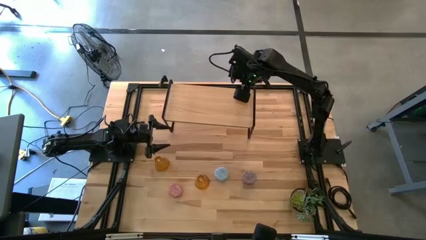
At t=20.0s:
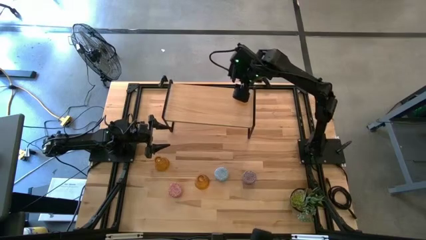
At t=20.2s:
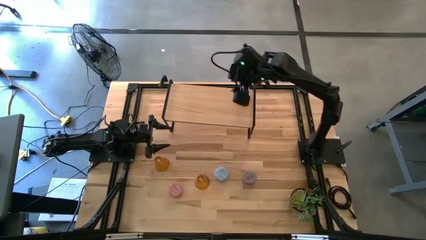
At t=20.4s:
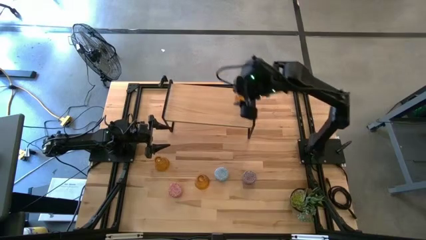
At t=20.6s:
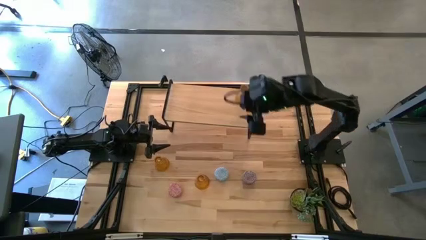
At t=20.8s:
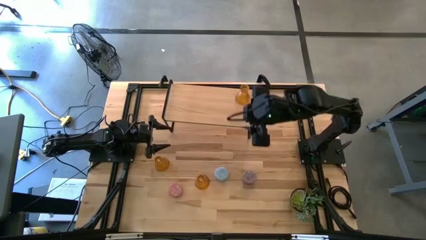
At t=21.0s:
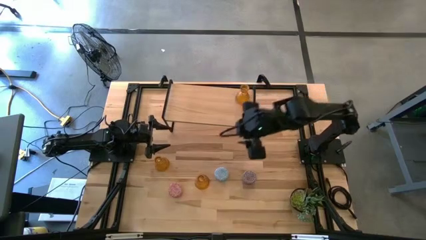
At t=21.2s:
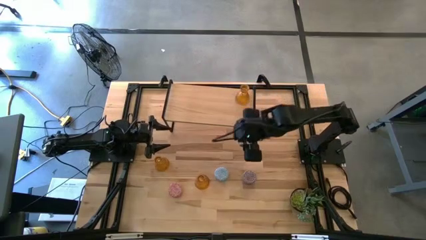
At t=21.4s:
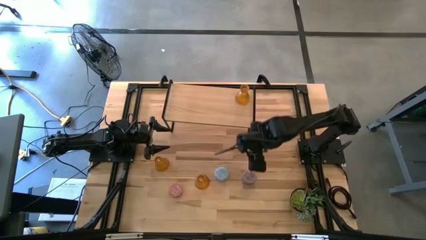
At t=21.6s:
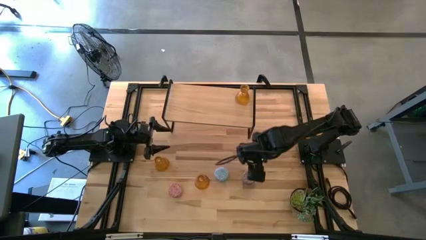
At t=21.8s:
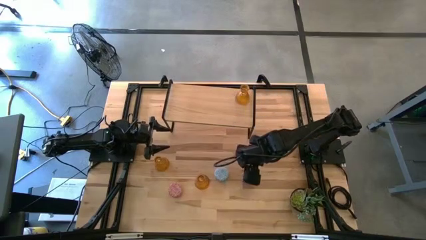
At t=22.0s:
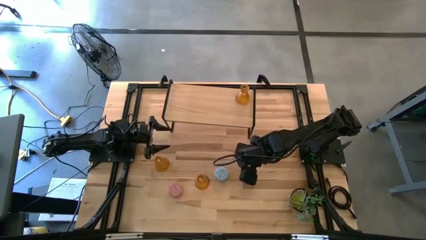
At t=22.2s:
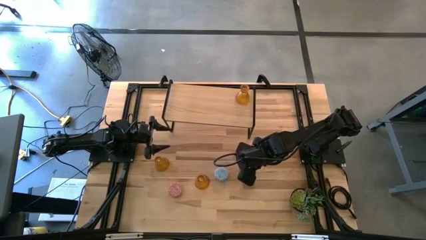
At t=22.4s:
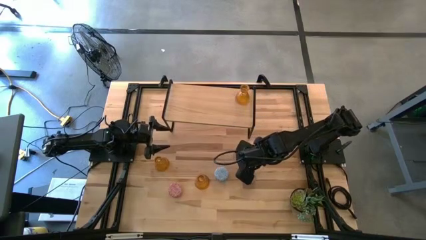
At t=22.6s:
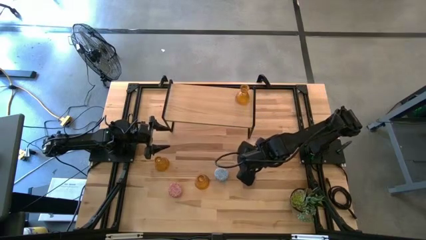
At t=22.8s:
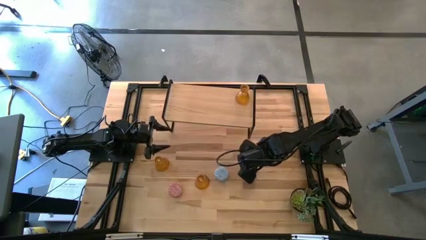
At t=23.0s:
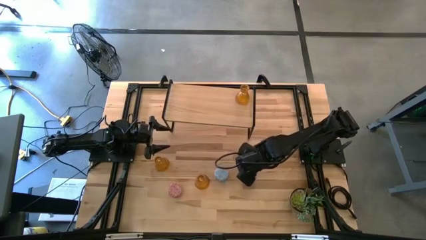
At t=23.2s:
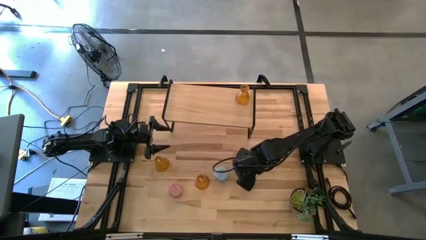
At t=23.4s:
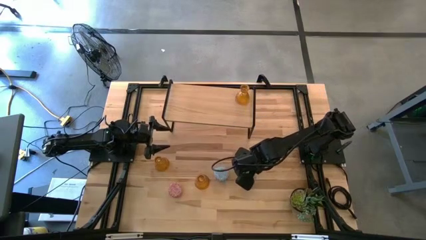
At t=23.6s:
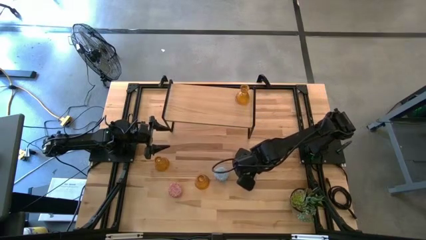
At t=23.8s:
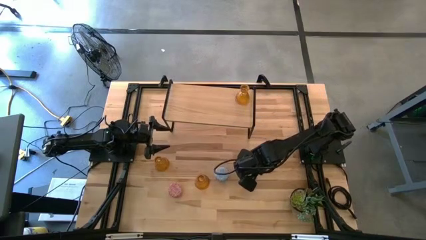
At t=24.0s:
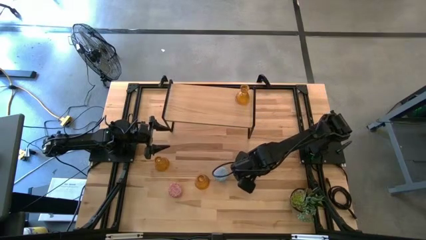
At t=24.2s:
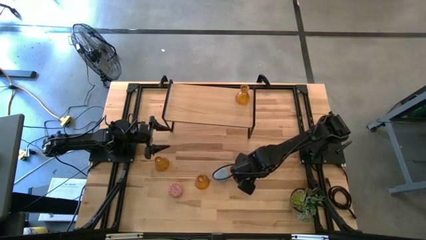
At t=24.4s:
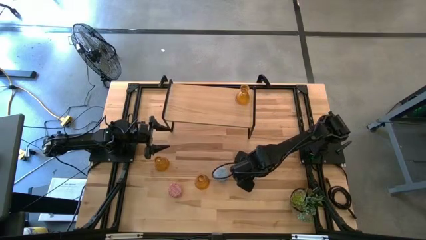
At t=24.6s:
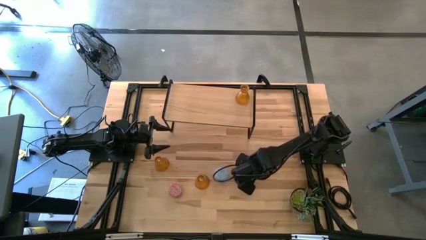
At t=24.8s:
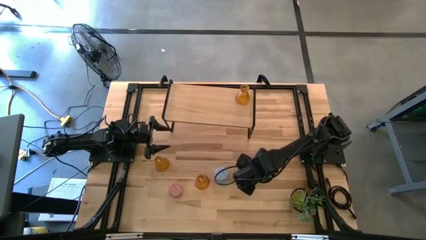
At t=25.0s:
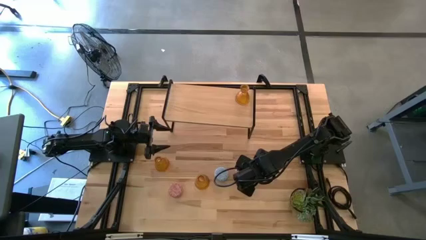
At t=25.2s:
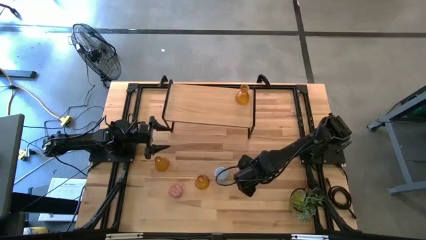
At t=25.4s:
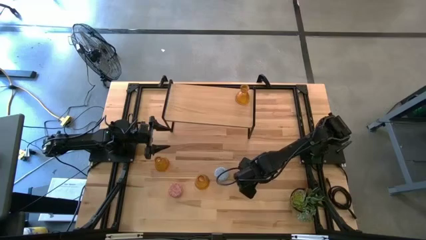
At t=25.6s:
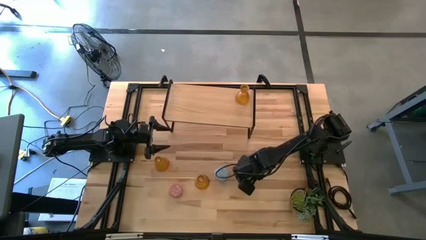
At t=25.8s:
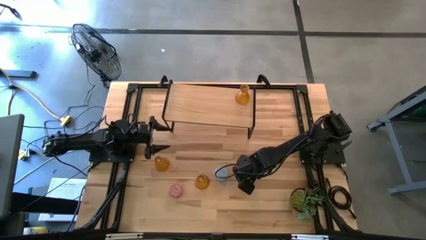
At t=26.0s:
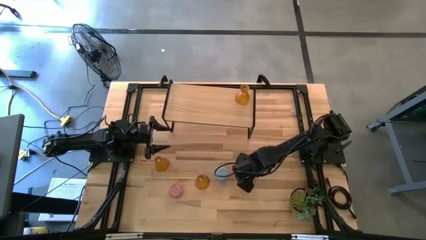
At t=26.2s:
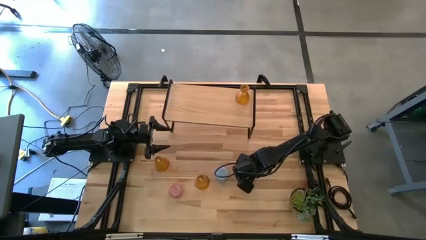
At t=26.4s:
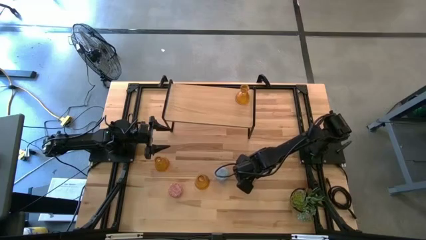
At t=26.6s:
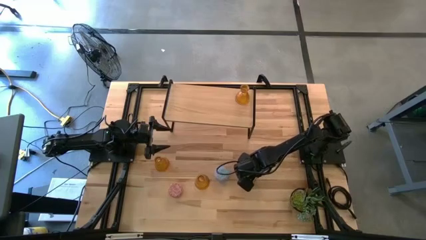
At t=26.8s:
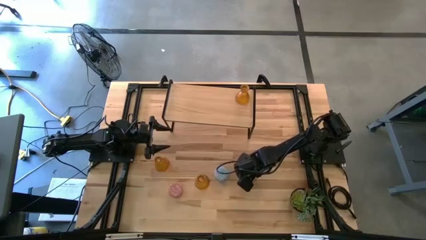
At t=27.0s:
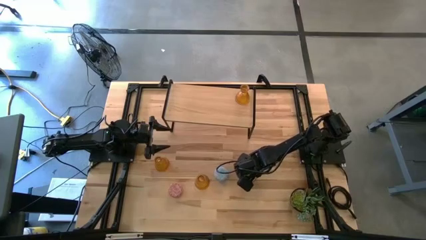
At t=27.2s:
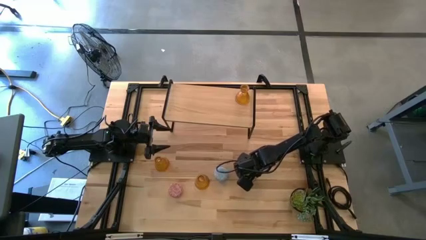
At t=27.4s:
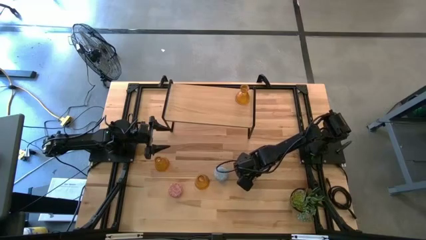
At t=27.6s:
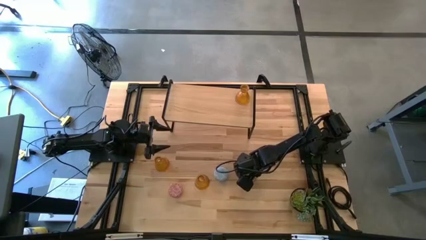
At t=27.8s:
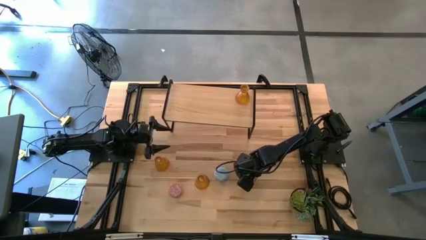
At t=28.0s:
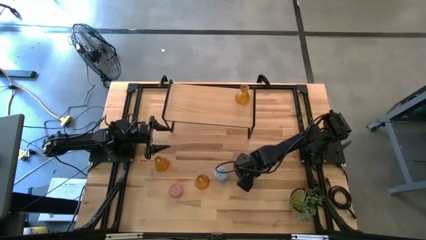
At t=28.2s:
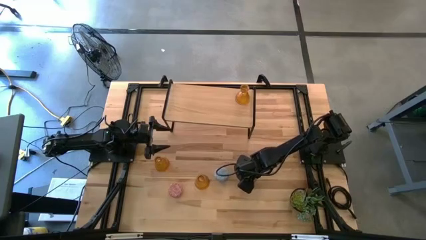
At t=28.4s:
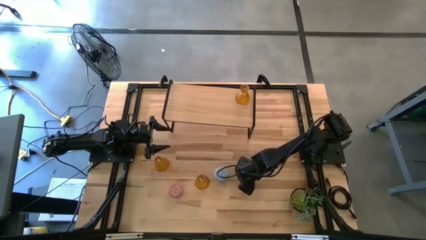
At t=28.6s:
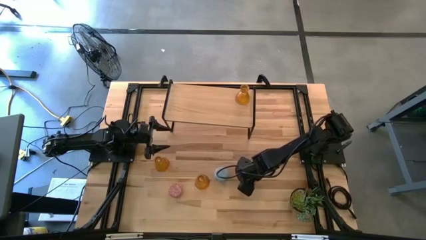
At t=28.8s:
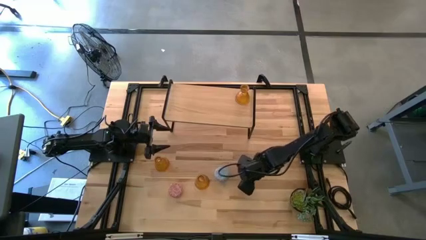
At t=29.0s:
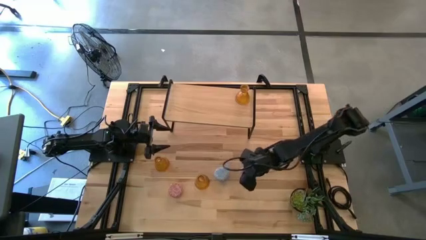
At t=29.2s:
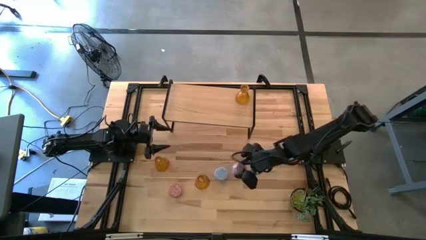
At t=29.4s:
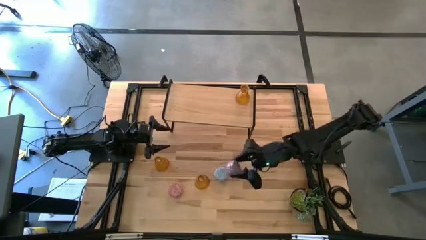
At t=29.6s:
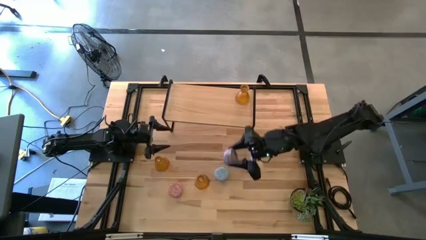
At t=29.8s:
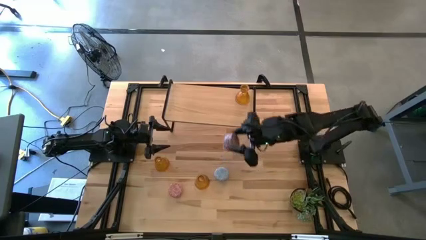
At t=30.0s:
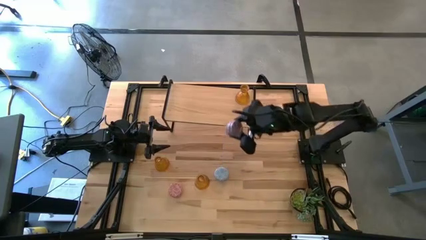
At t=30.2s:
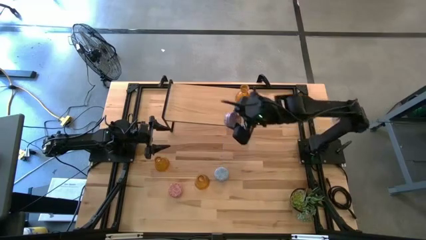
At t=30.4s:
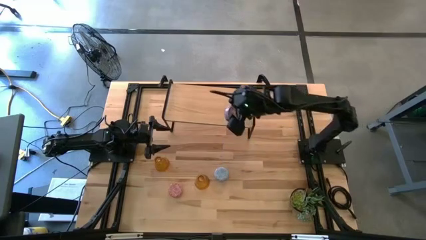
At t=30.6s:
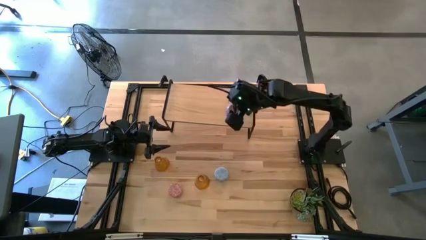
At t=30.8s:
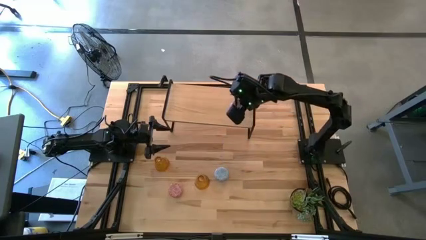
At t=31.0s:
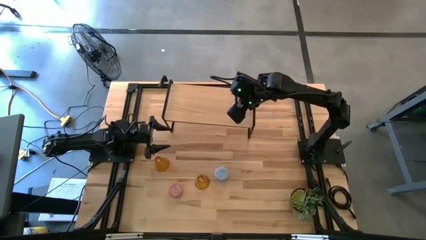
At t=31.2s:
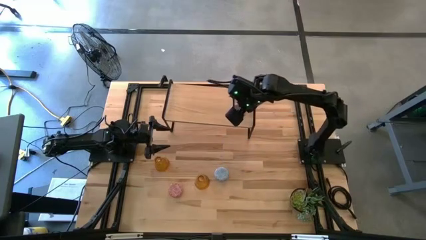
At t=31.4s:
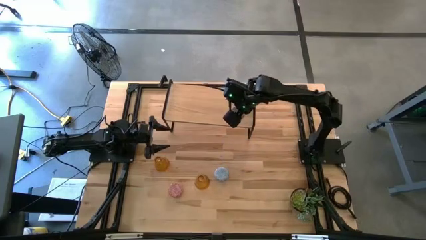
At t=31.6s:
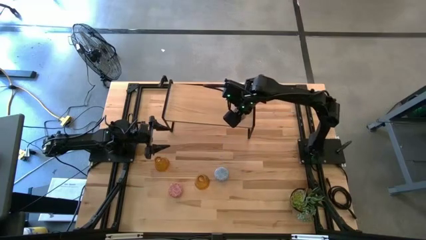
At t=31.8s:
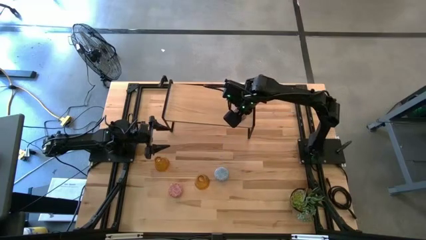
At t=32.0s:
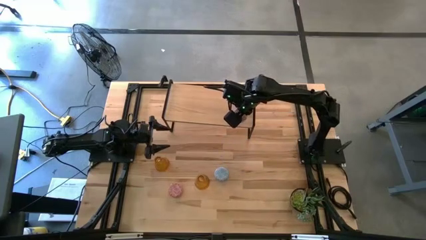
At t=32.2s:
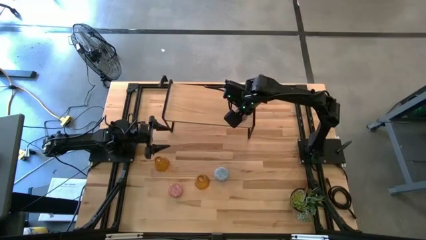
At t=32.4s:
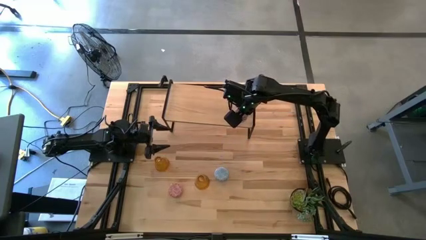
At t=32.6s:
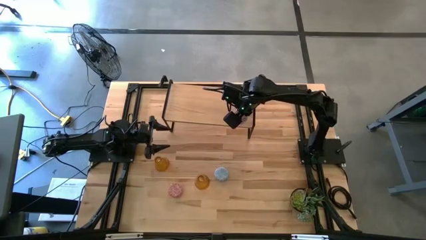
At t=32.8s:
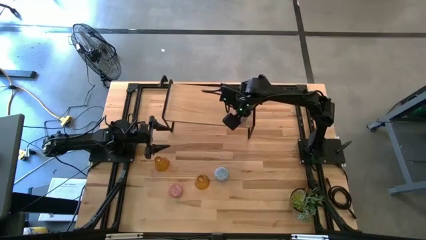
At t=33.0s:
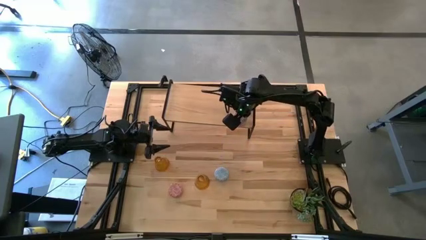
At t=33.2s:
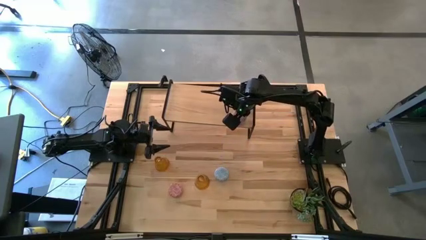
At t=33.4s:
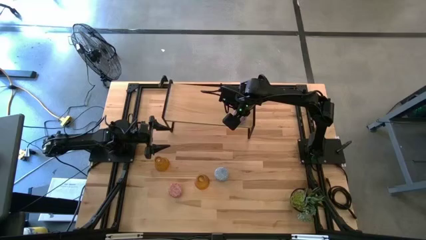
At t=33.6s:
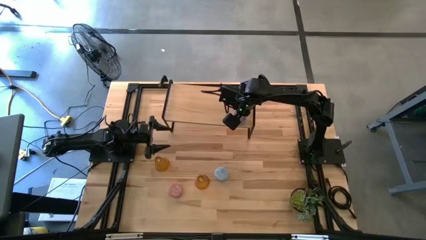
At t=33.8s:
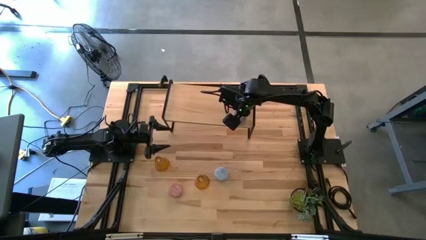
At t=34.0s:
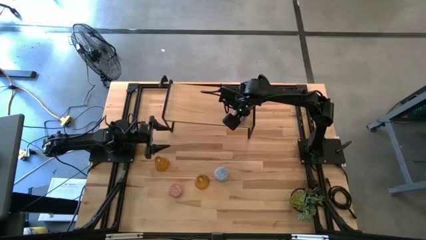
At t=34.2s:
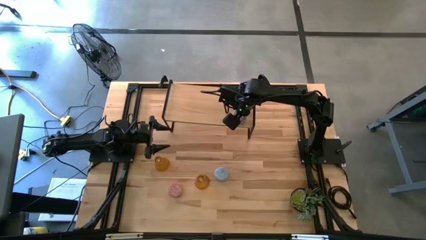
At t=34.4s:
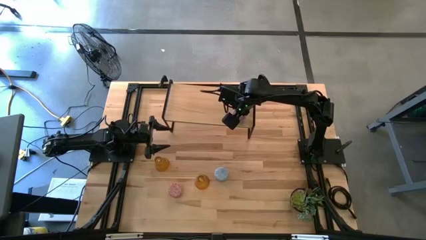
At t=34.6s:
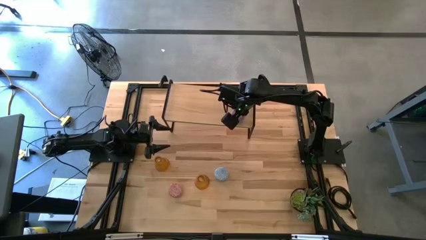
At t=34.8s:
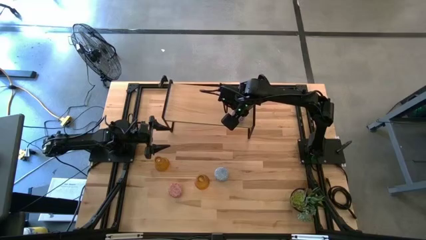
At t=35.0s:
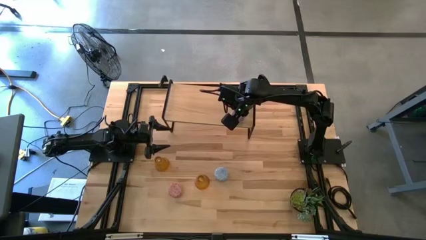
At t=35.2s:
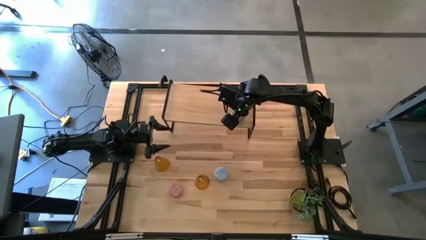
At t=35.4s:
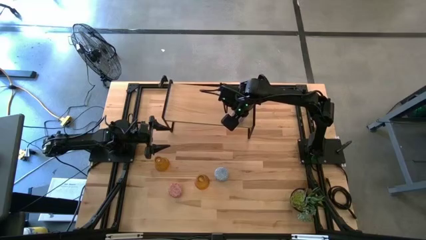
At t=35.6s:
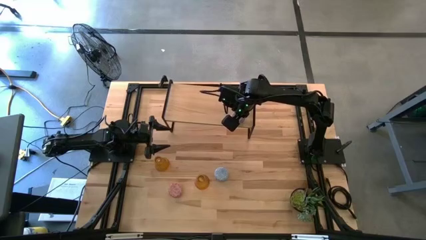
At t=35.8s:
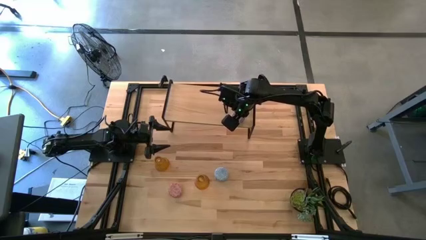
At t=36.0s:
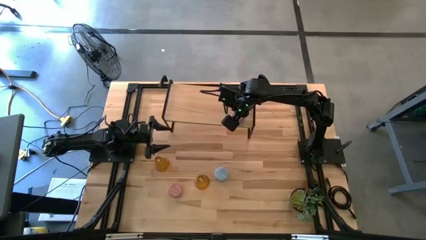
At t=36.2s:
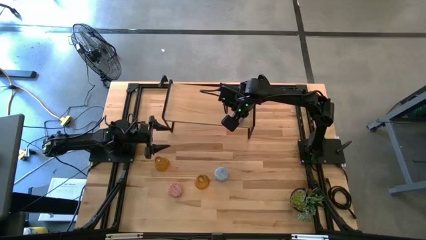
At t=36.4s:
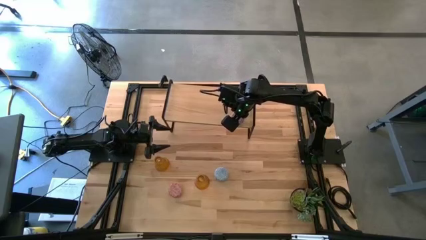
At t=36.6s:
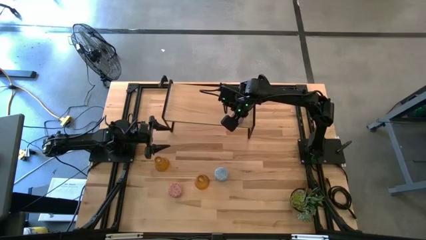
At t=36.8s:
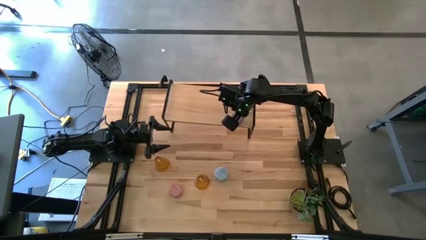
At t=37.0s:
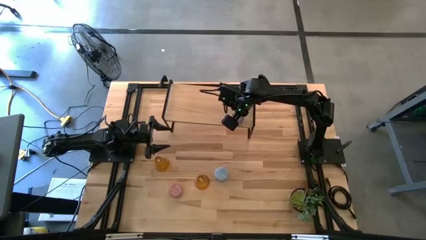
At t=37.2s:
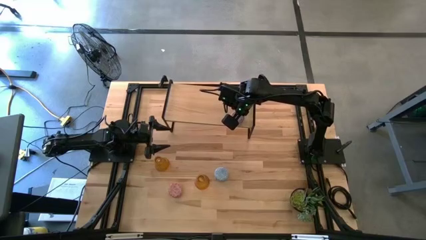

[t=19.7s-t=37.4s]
Task: Pick & Place candle stick holders
Put the red scented candle on the shelf
